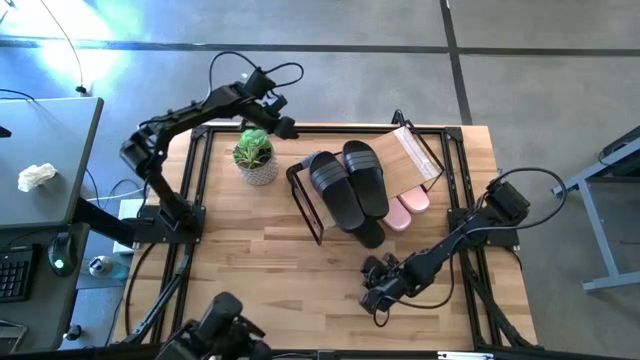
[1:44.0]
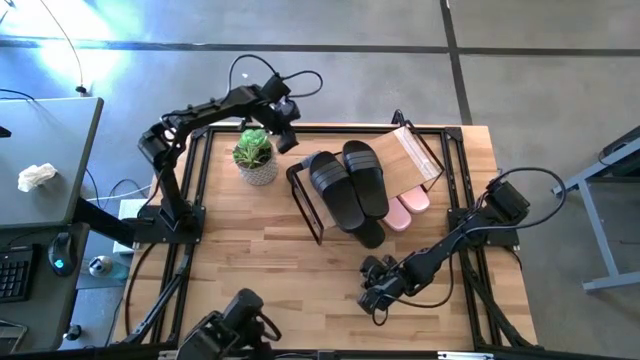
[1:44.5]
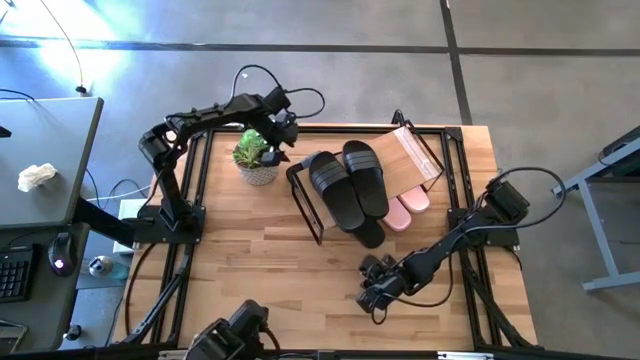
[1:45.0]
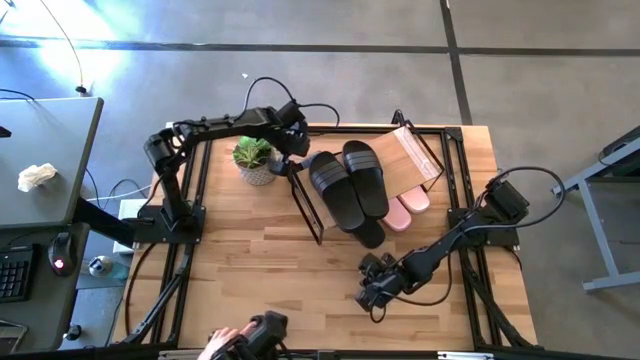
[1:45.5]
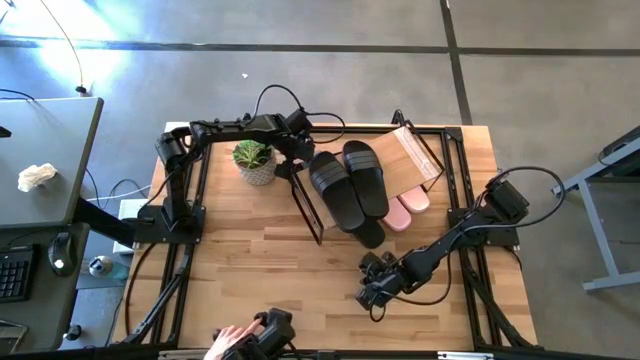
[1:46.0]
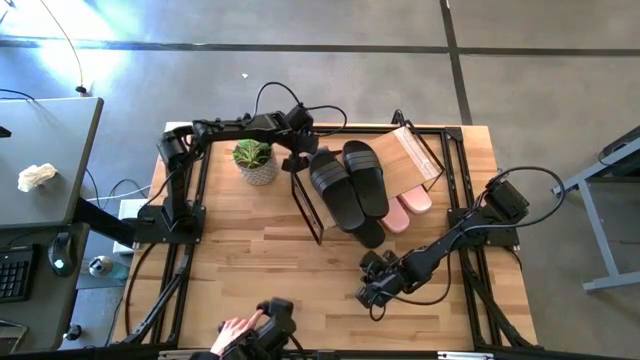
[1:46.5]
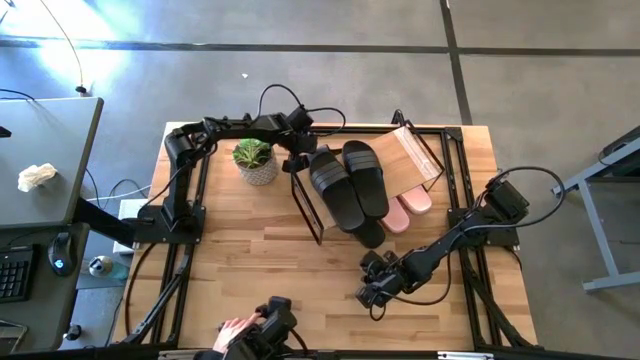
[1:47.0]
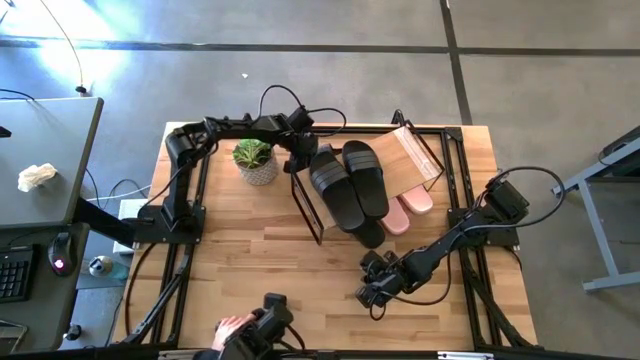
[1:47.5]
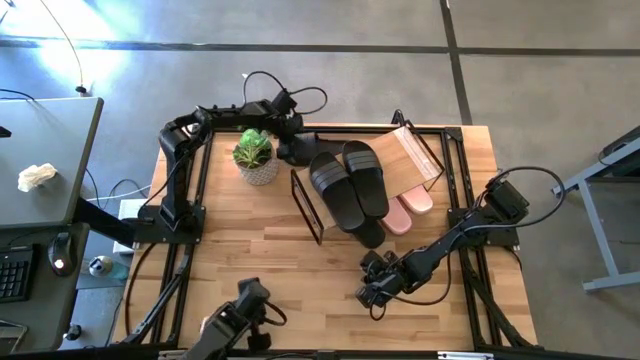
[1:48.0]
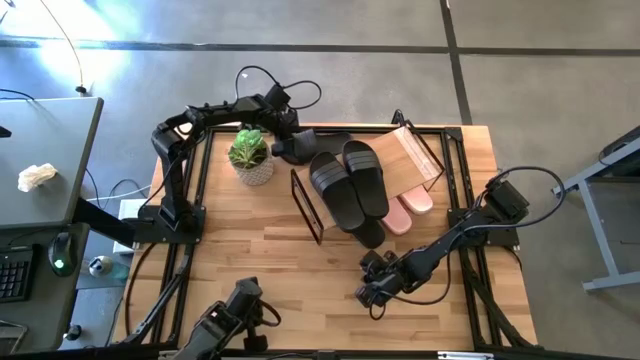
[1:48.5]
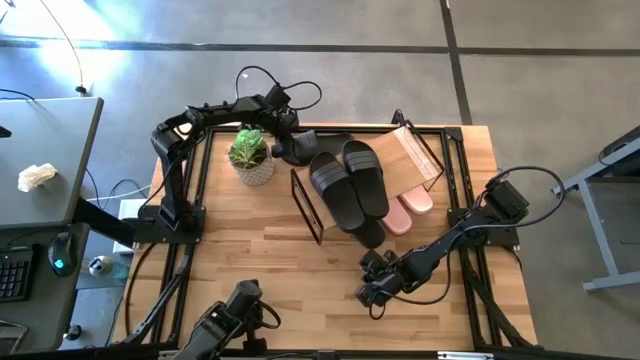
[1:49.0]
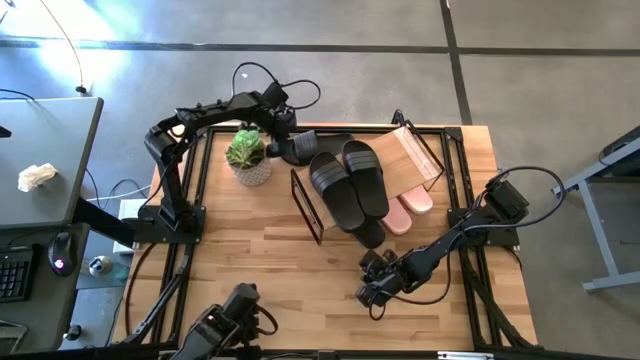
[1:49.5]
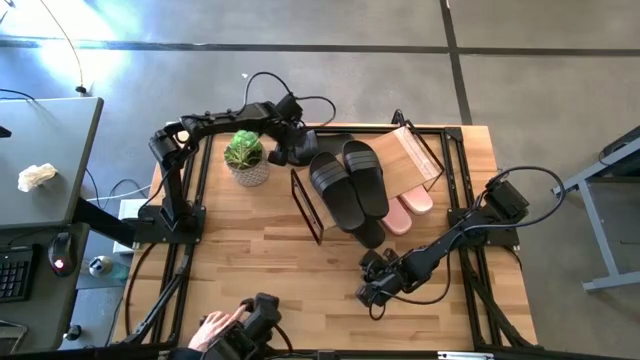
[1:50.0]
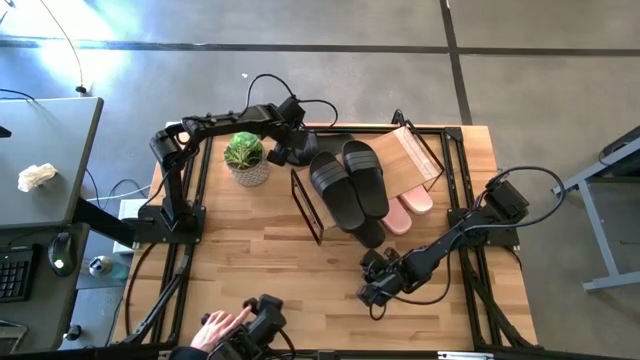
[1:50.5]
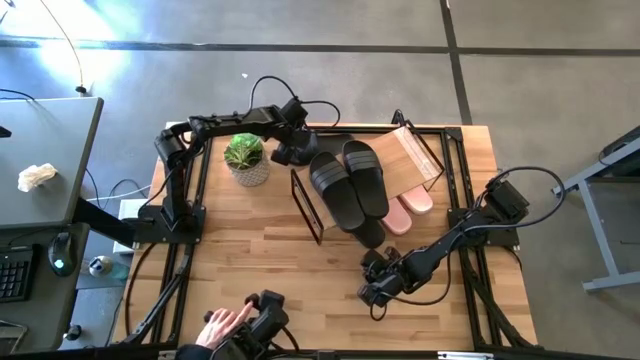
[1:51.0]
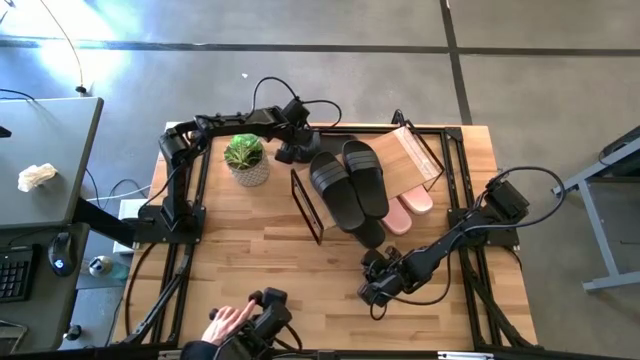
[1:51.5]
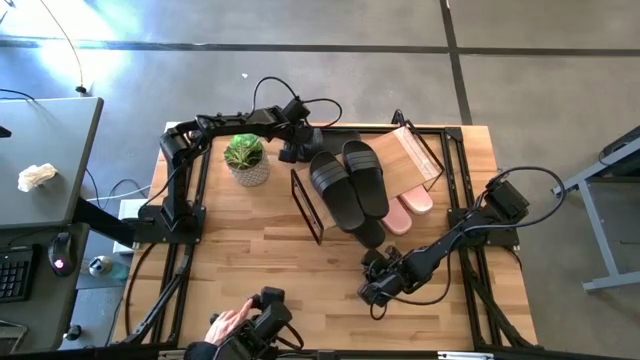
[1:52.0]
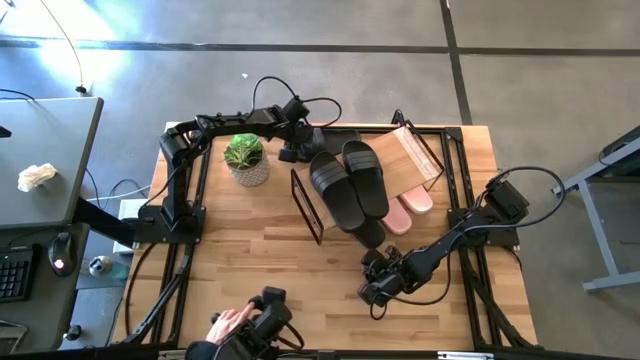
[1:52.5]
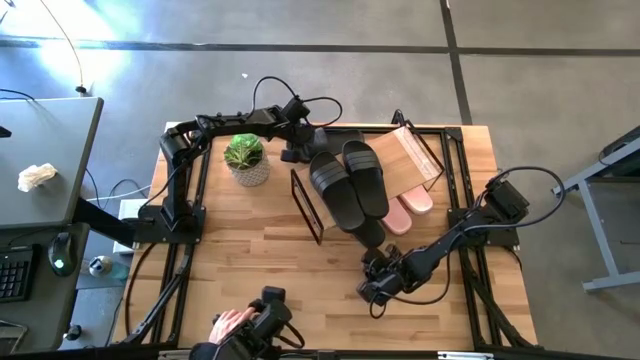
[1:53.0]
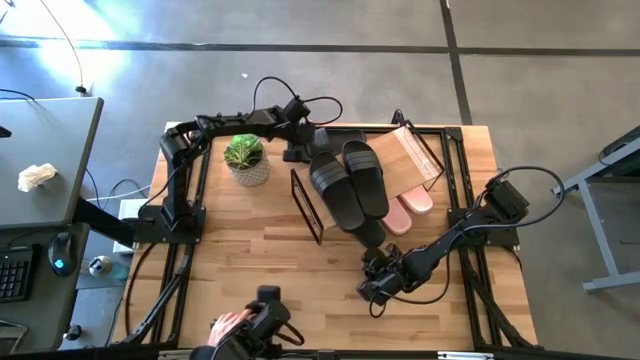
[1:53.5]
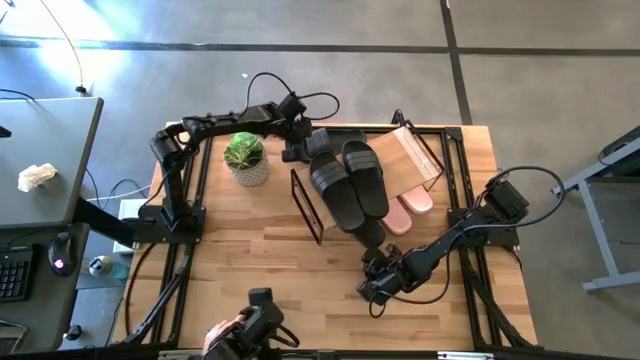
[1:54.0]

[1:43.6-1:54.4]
Task: Pick and place slides into the shelf
Put the black slipper under the shelf

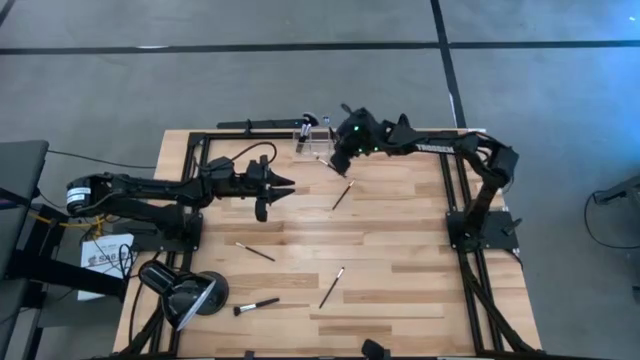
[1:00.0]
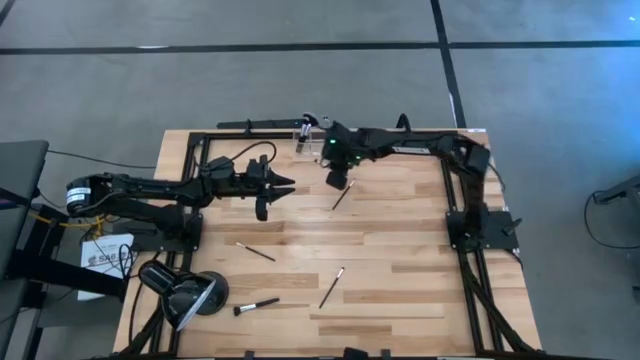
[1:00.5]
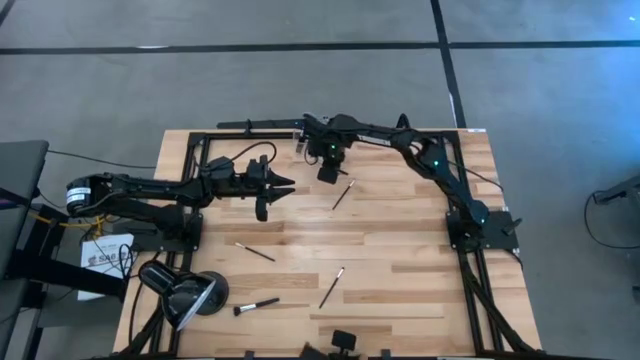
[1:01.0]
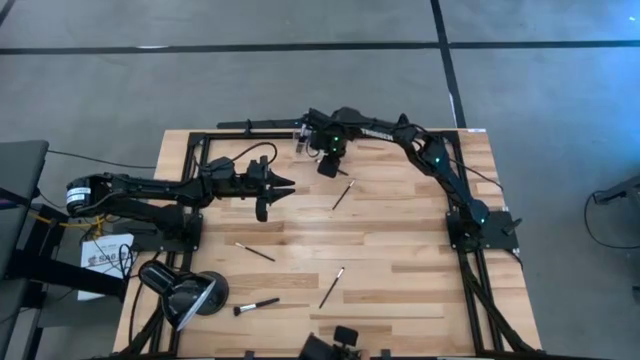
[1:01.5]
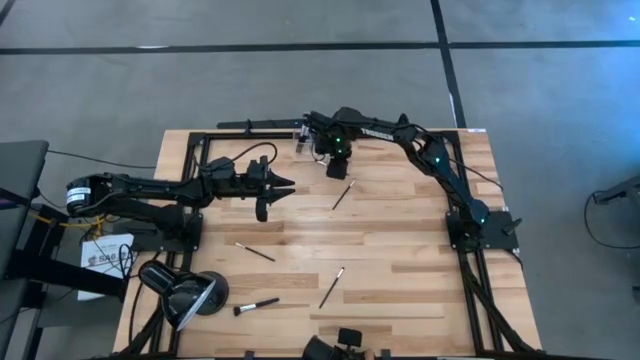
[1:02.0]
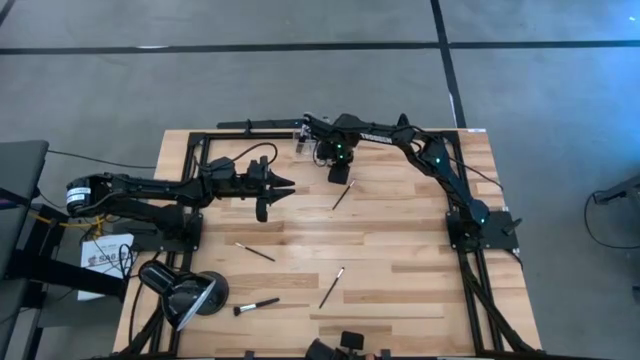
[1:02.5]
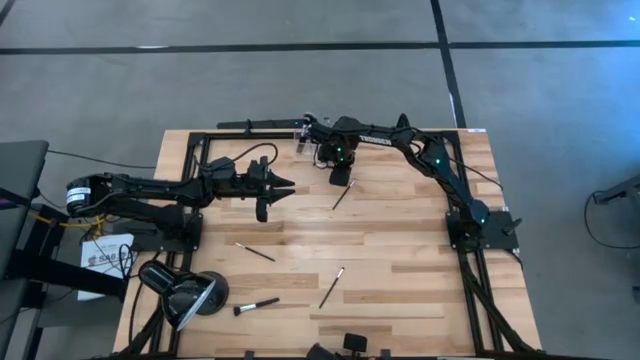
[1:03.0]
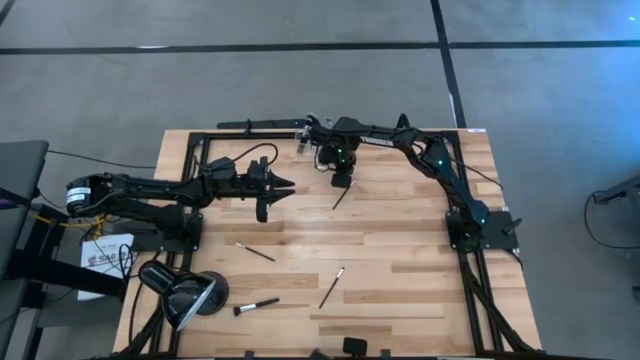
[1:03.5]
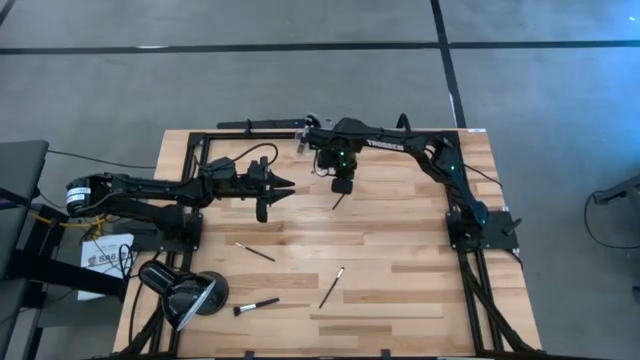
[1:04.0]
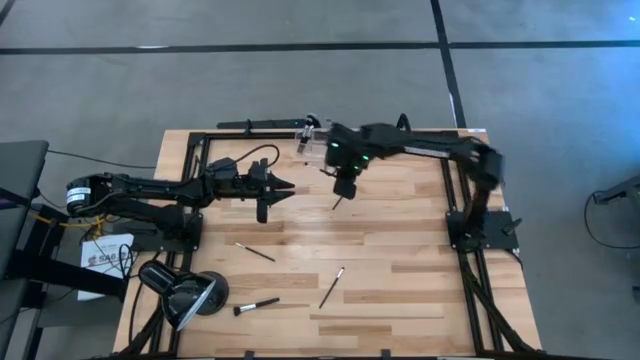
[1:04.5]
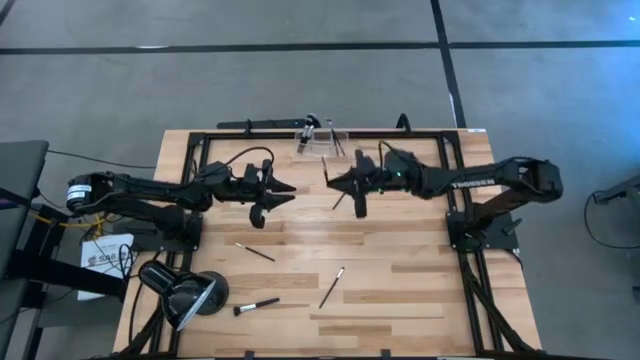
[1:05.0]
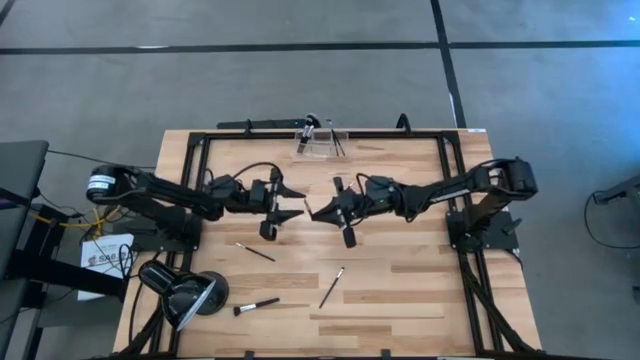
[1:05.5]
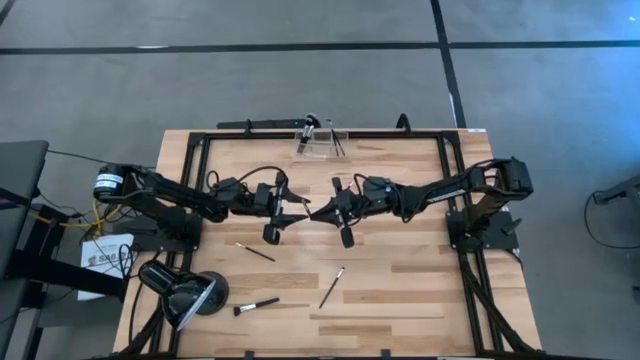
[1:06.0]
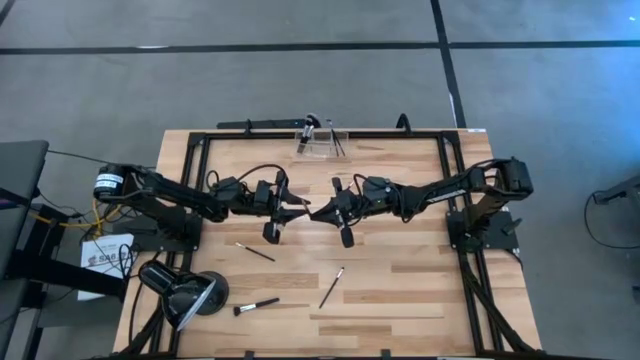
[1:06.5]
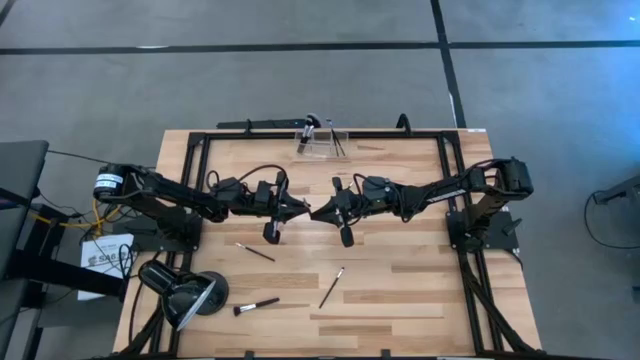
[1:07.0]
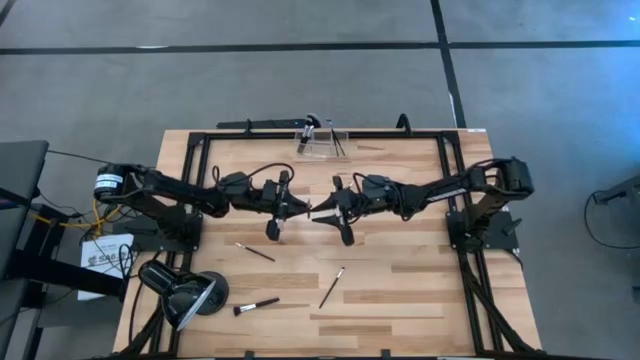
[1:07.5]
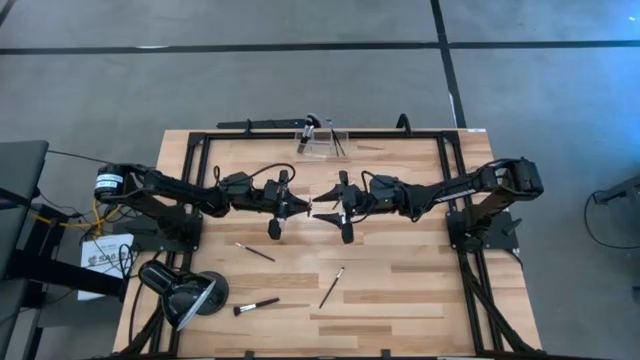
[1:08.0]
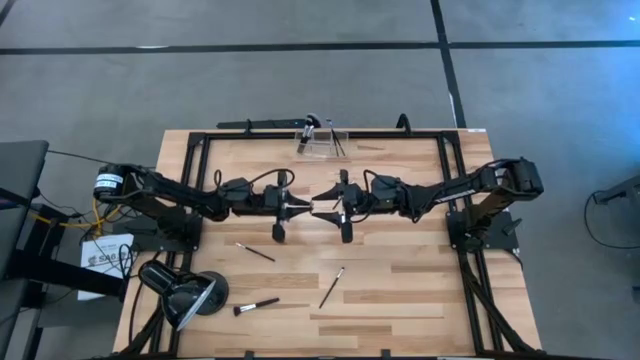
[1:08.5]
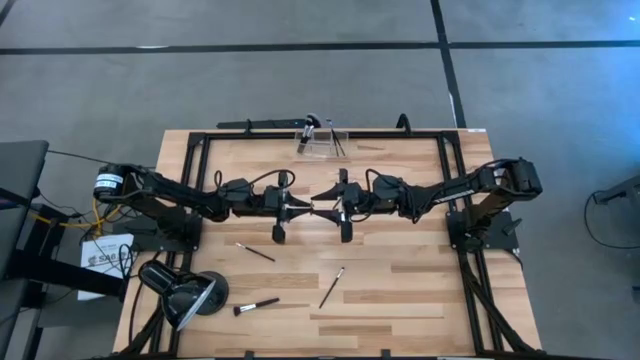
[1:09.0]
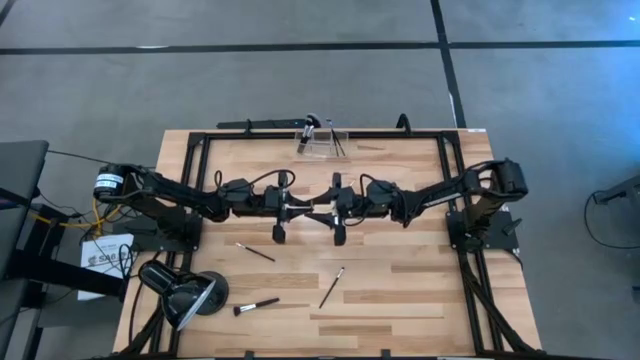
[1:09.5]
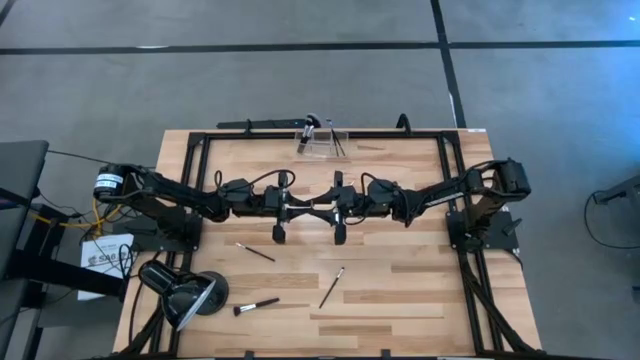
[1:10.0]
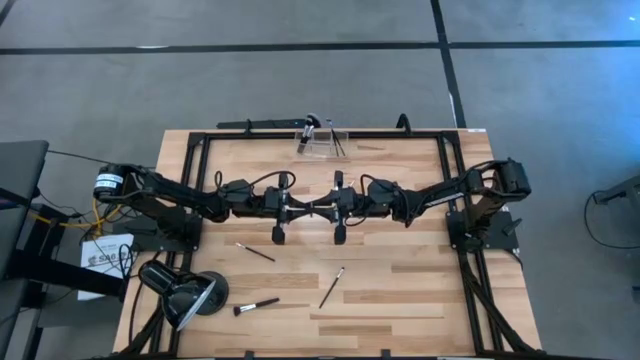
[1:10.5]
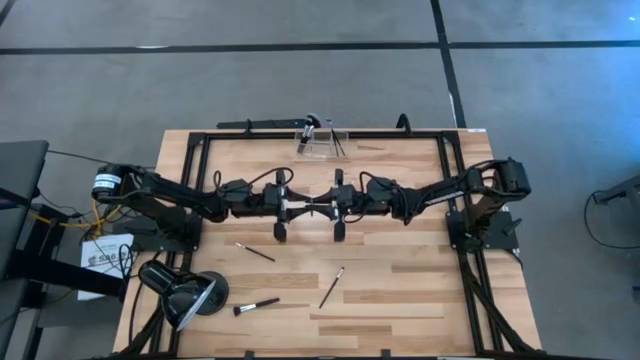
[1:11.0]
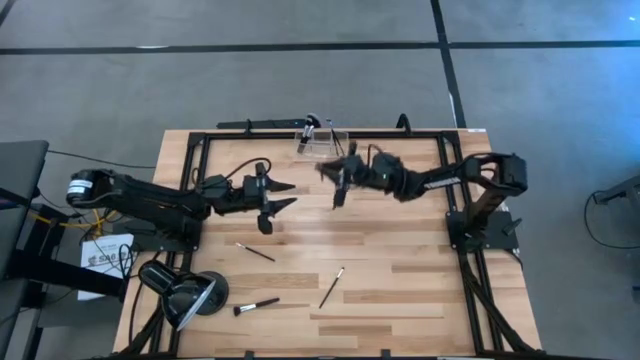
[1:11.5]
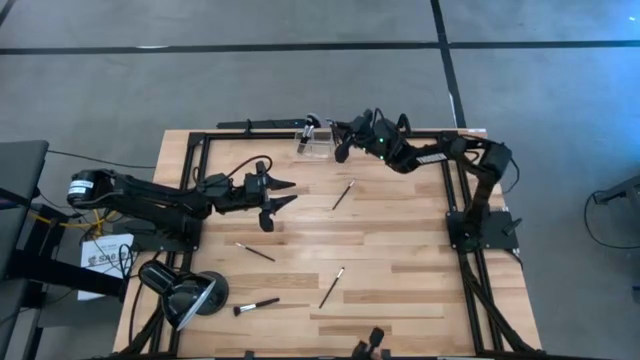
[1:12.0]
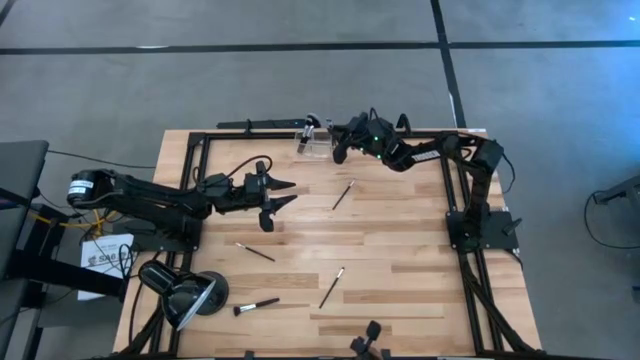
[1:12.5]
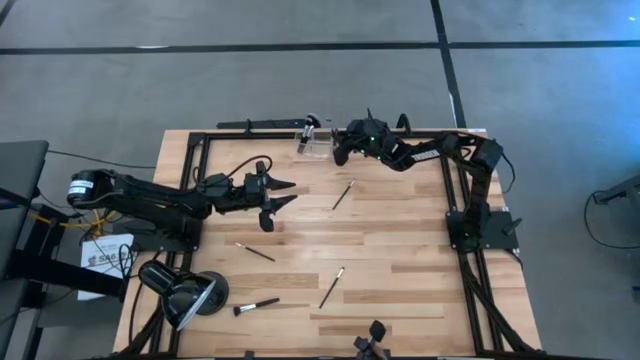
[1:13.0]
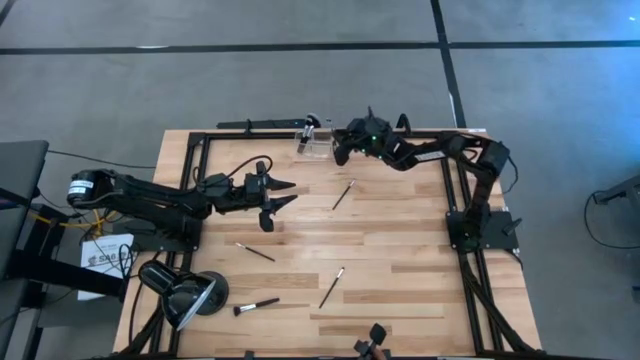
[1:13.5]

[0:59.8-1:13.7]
Task: Sort items
Put the eyeshadow brush into the right section of the transparent organizer
